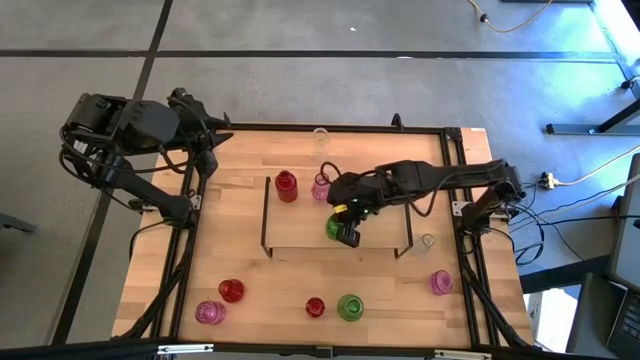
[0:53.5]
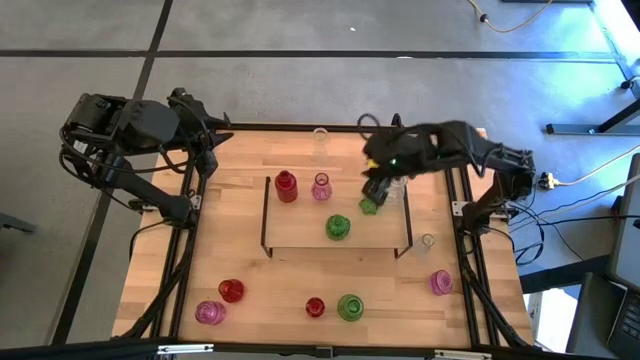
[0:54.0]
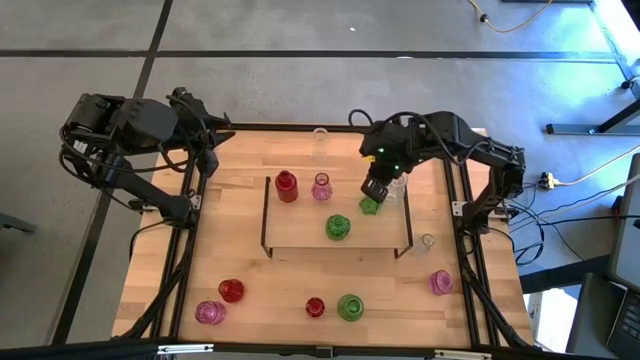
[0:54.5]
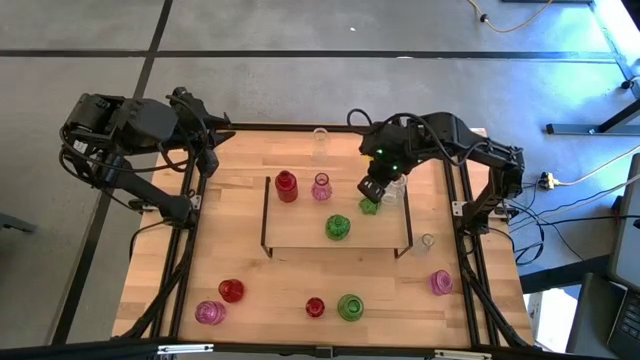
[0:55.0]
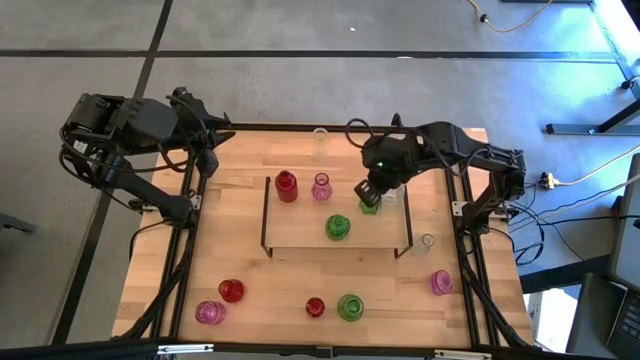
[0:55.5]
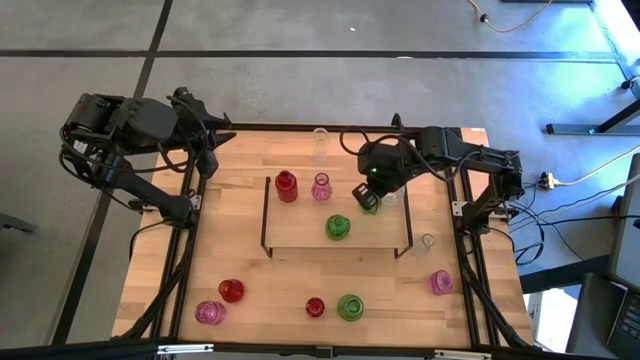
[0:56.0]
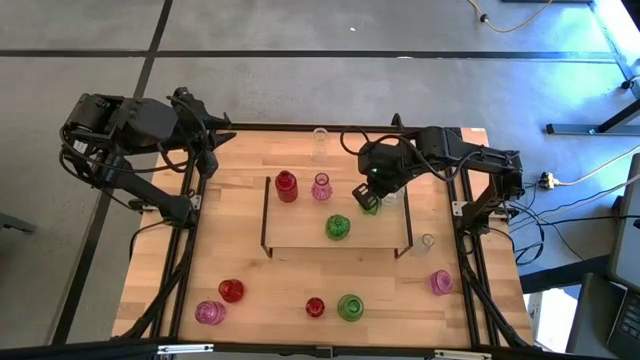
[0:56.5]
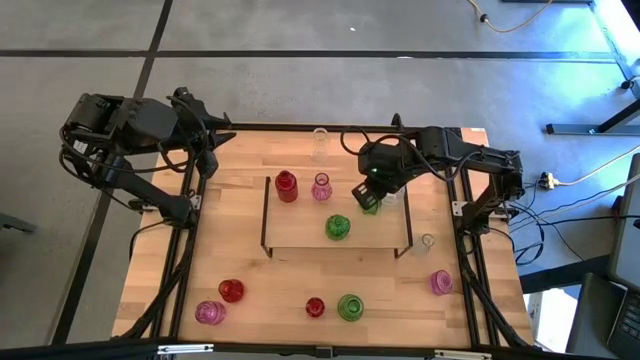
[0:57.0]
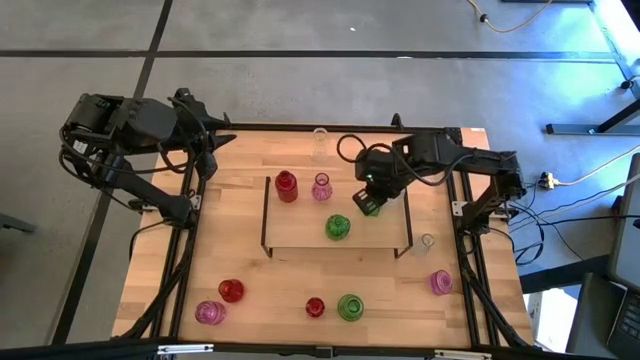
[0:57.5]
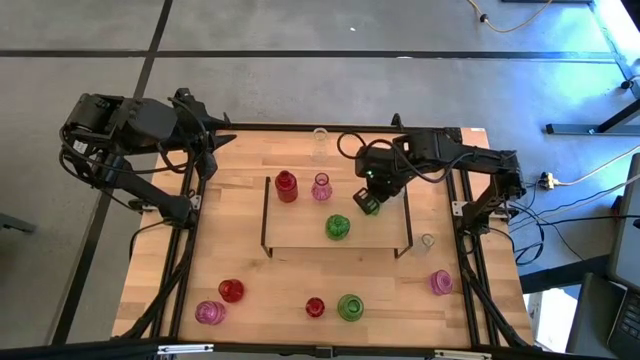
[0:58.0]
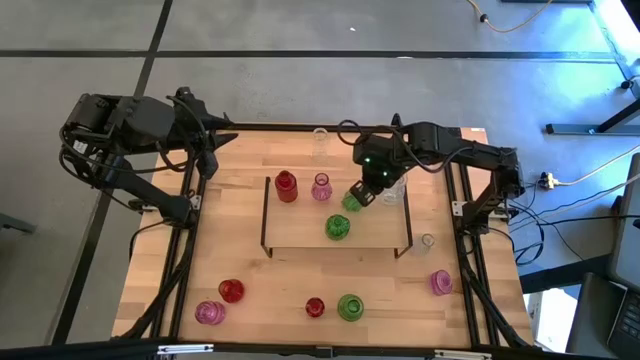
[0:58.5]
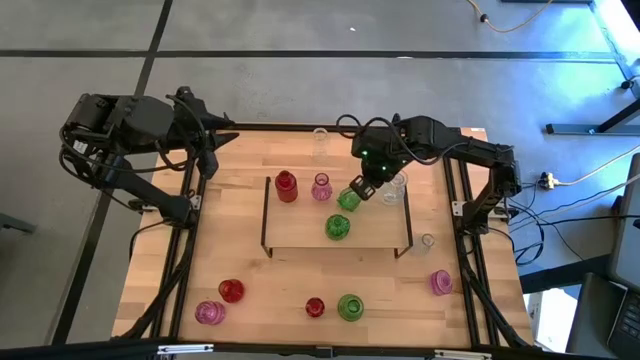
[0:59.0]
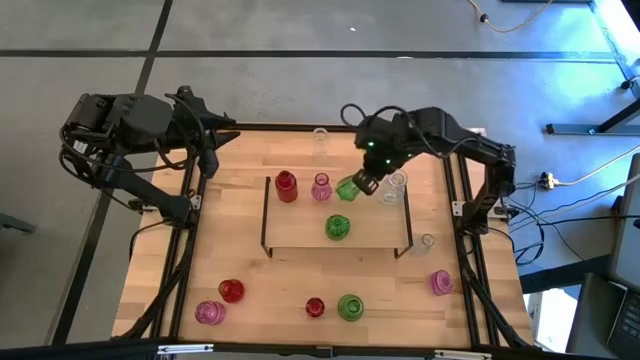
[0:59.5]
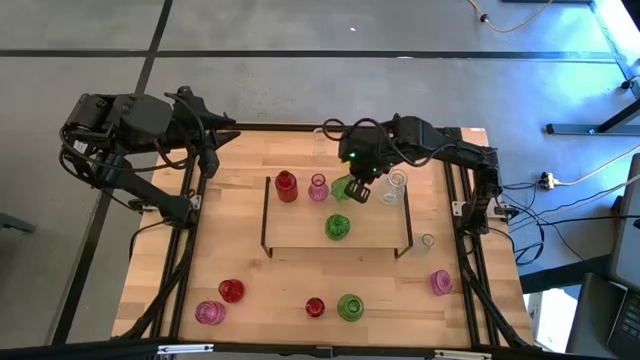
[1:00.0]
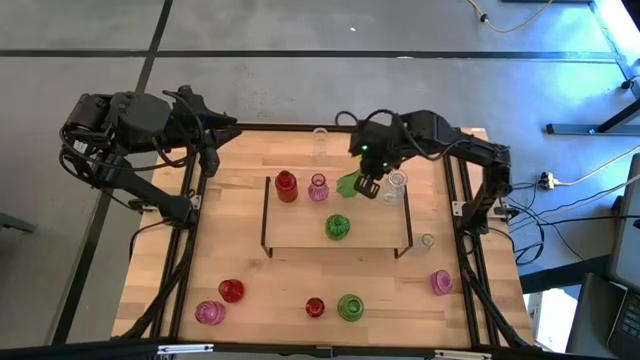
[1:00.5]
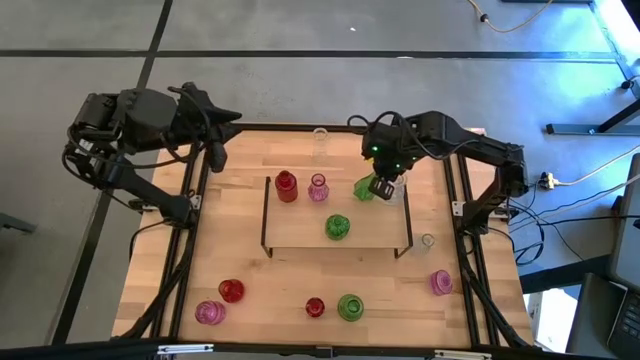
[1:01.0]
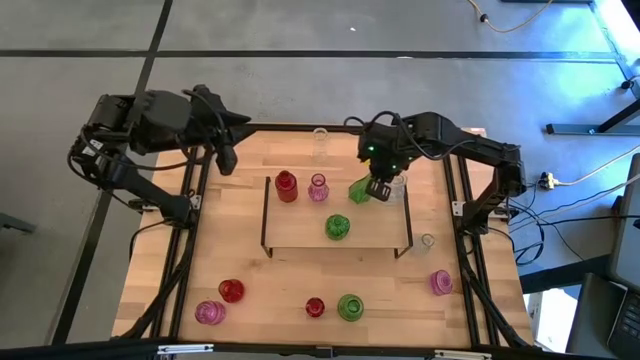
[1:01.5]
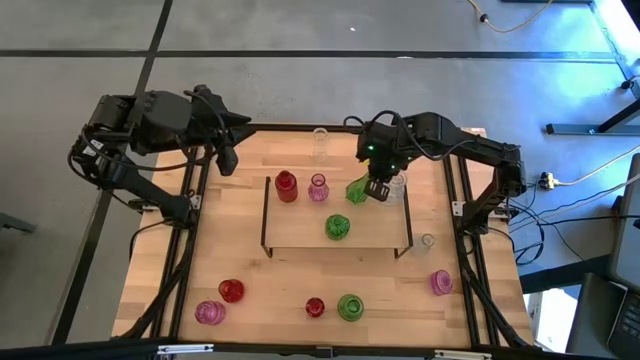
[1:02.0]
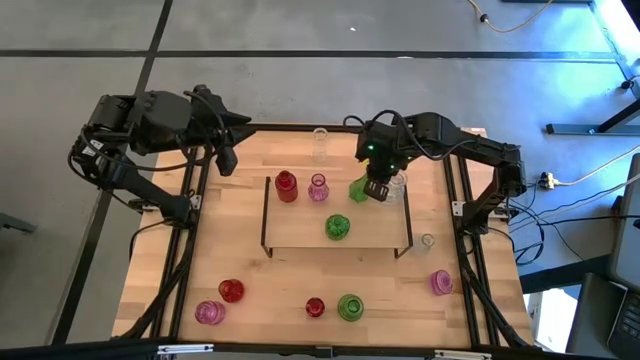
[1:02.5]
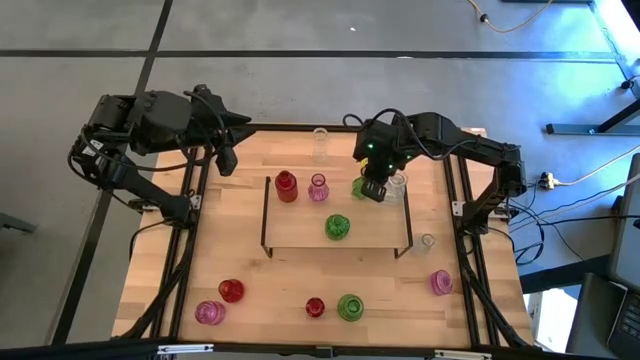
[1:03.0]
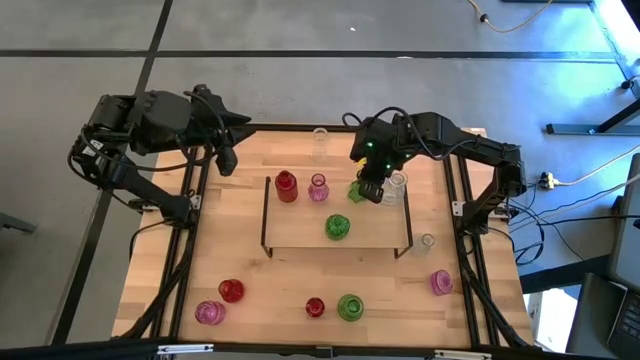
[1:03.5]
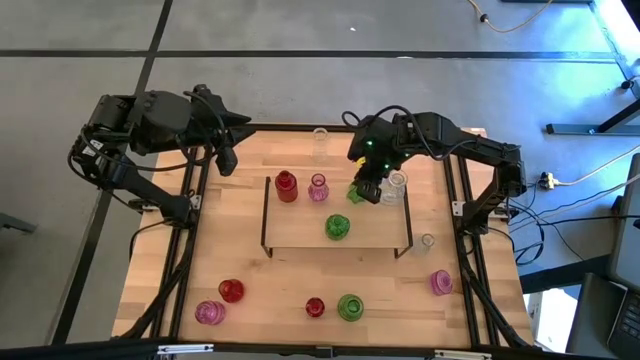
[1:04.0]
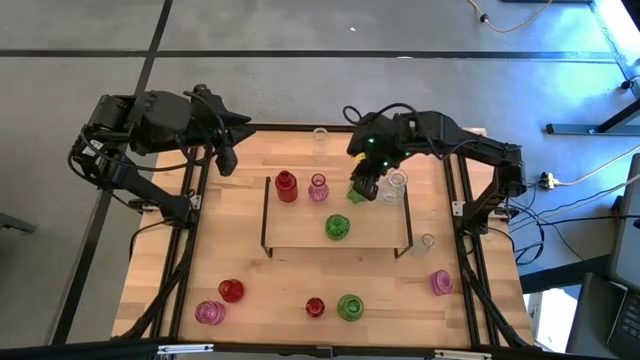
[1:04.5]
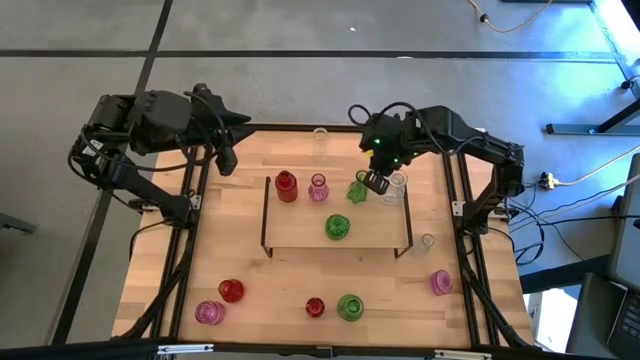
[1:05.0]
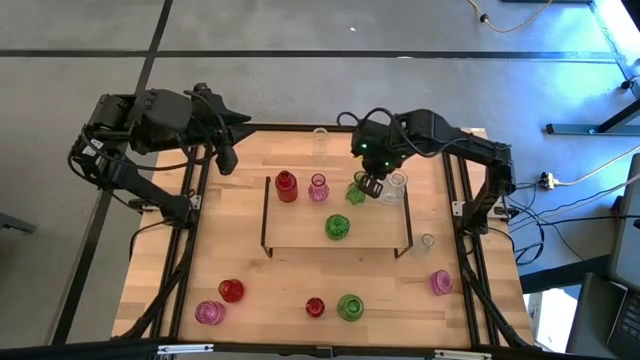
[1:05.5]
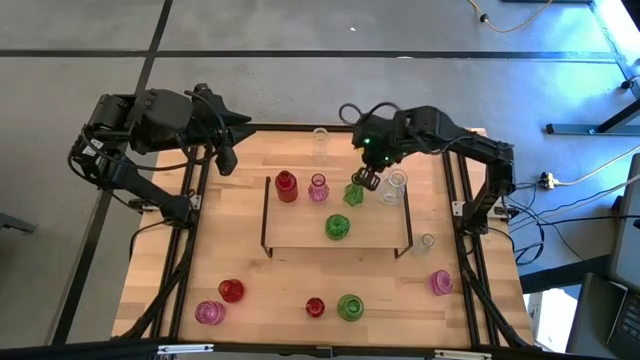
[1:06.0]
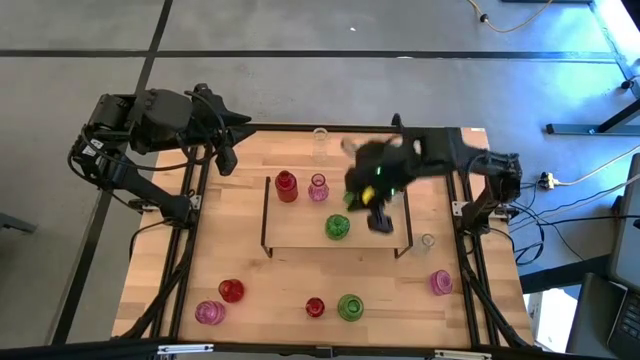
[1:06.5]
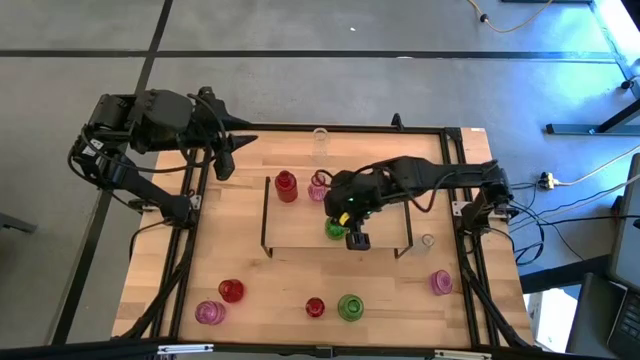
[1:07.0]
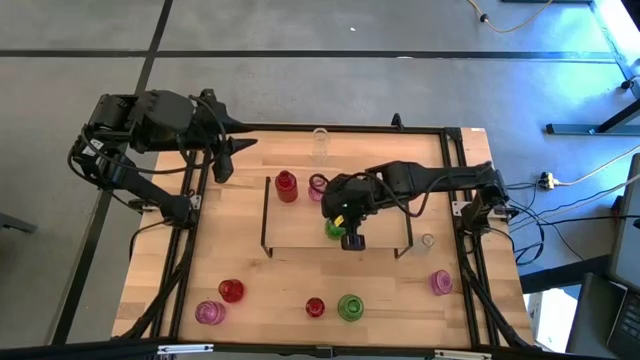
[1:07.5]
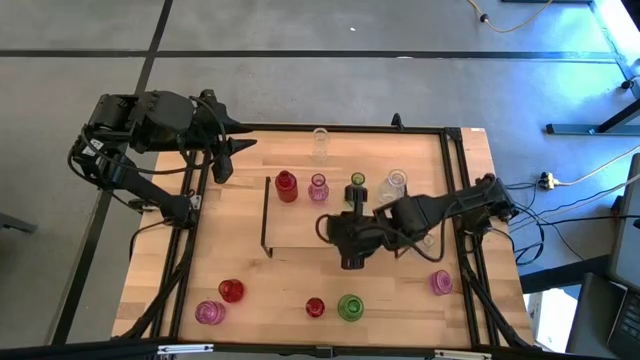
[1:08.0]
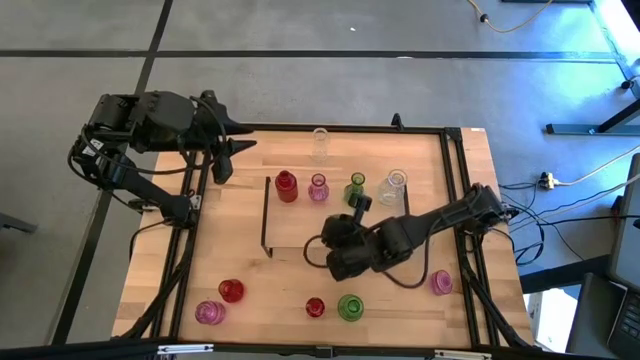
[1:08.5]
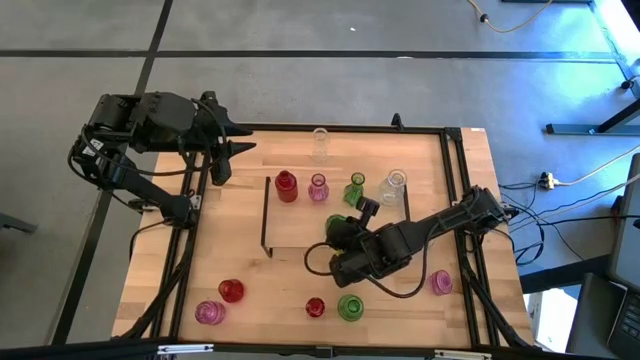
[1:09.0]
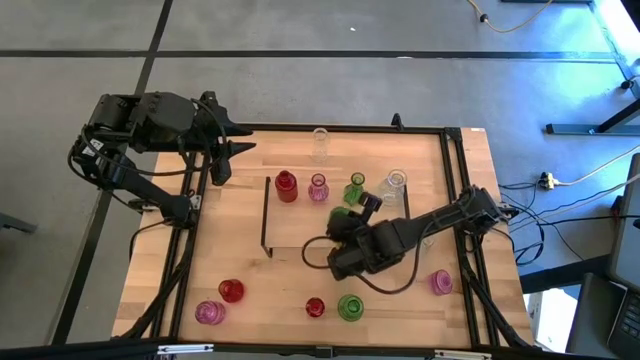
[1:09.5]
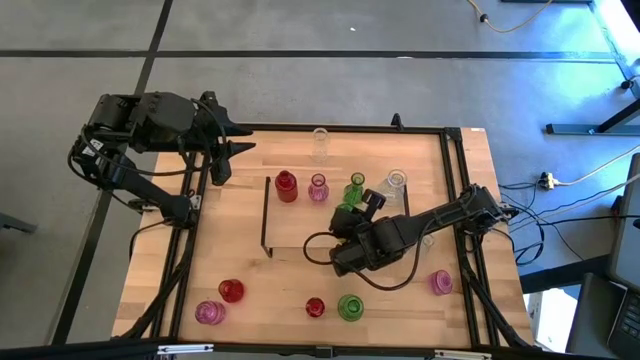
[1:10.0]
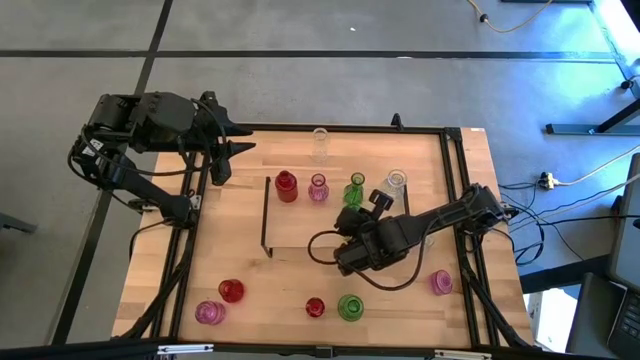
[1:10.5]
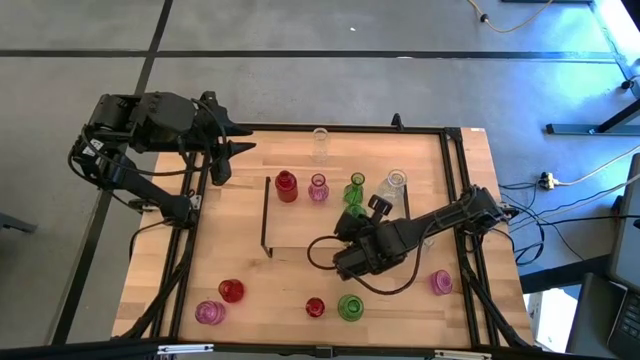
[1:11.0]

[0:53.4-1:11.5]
Task: sort vases onto shelf
Adjust the green vases on the shelf aligning them together

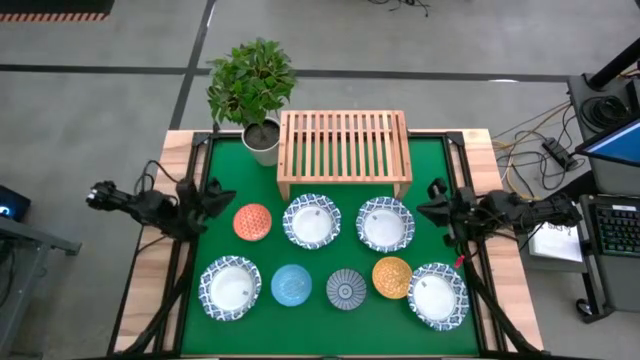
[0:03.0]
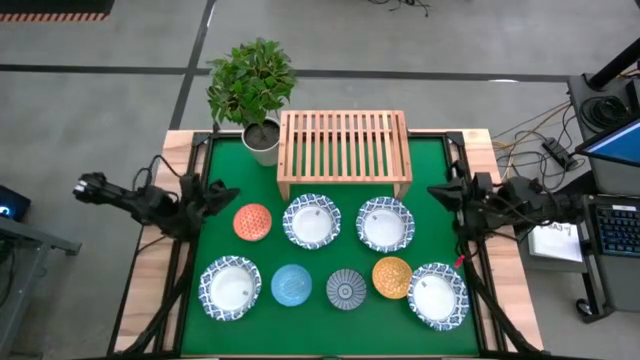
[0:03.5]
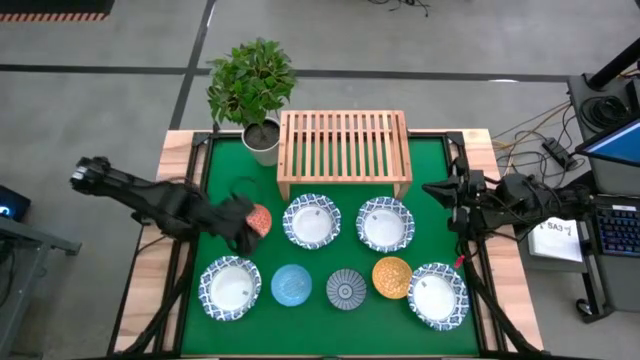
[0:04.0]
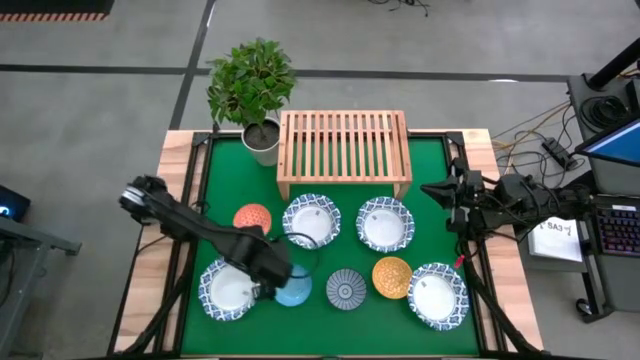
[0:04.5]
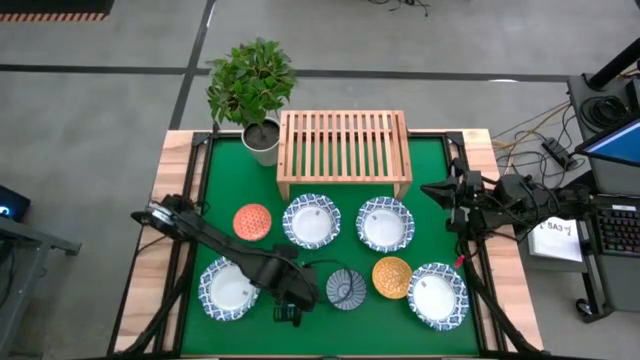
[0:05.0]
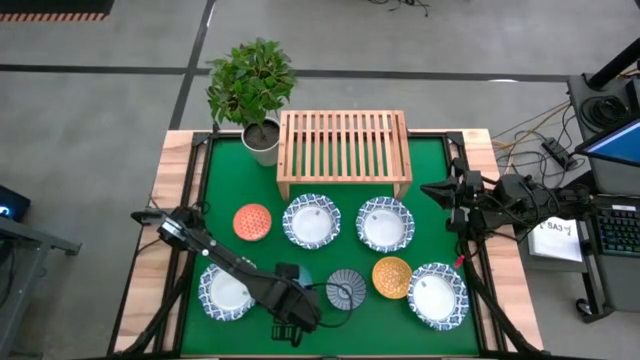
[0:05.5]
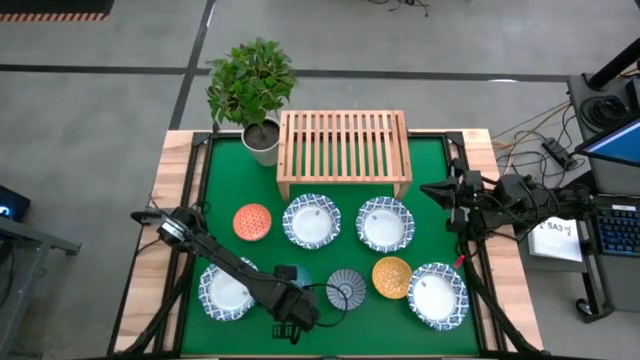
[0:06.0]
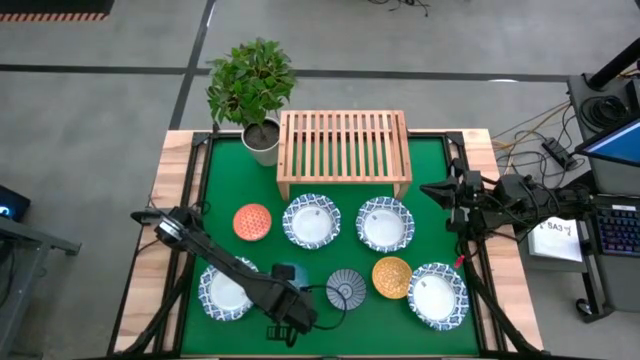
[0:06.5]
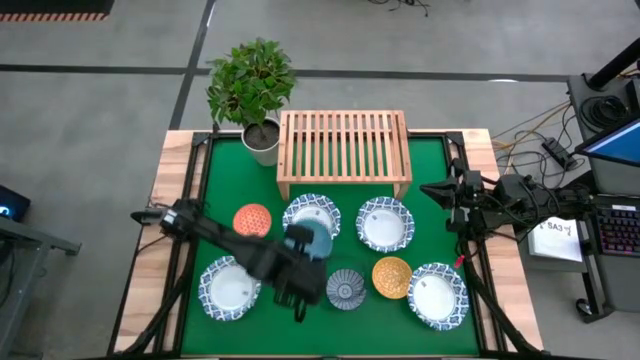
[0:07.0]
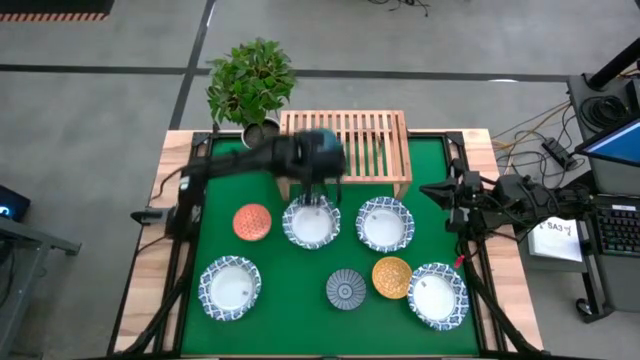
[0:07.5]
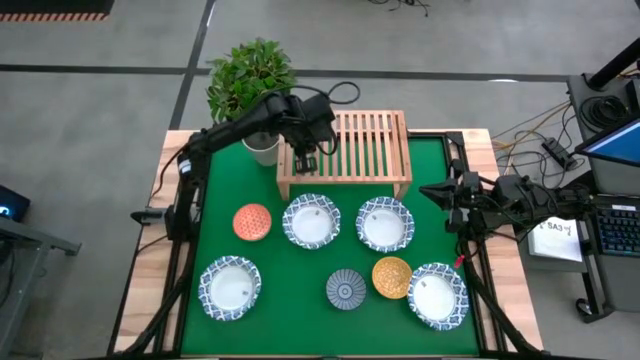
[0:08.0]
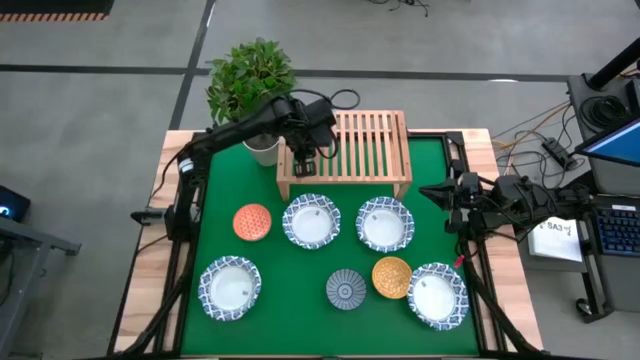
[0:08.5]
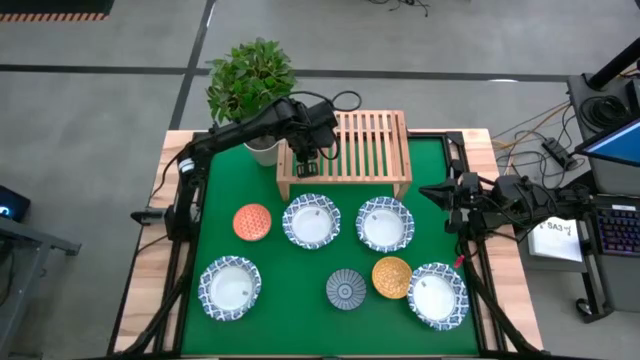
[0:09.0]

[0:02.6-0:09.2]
Task: Place and stack bowls onto a shelf
Put the light blue patterned bowl on the shelf
